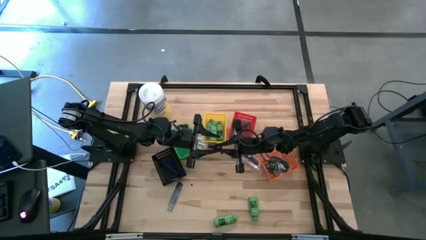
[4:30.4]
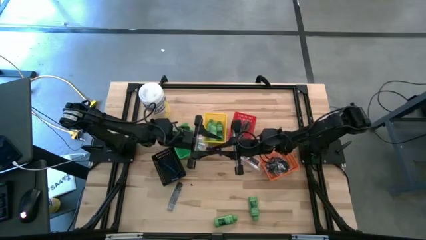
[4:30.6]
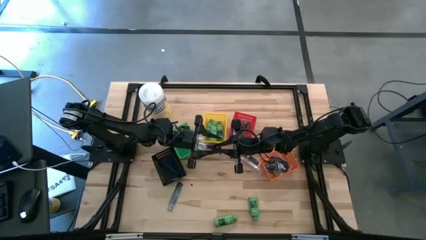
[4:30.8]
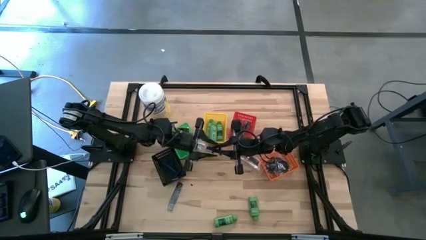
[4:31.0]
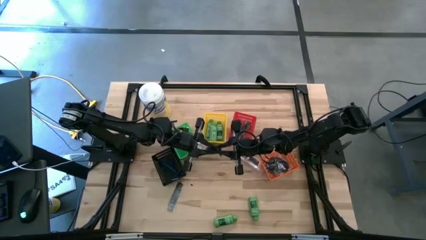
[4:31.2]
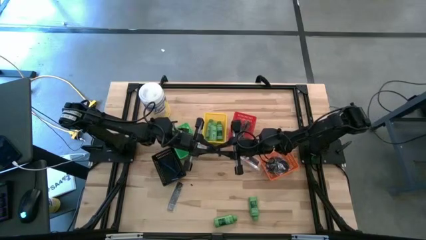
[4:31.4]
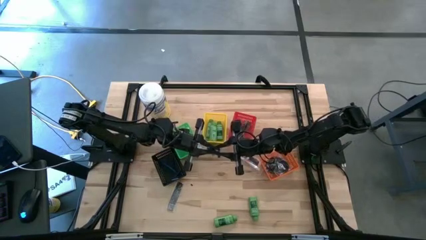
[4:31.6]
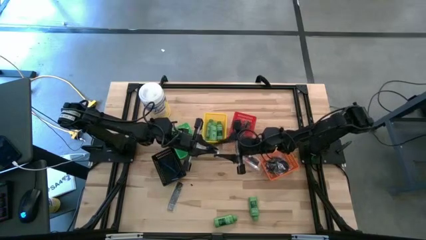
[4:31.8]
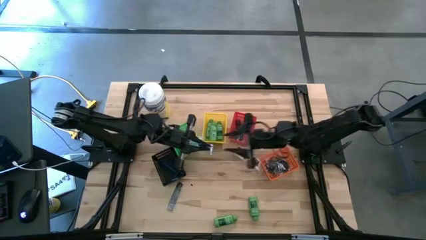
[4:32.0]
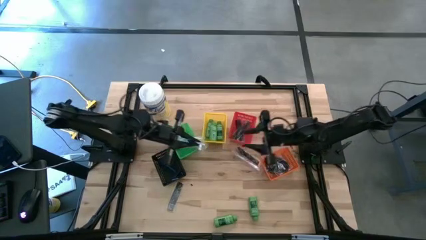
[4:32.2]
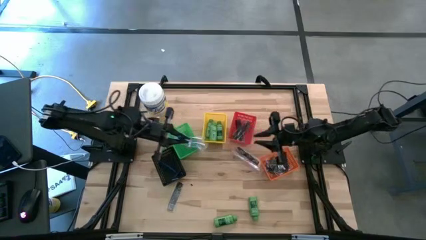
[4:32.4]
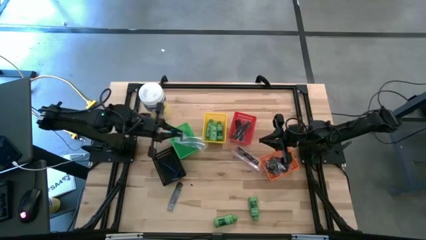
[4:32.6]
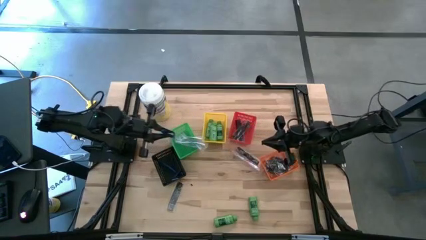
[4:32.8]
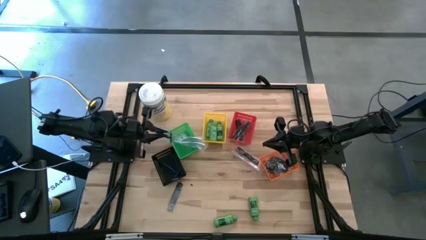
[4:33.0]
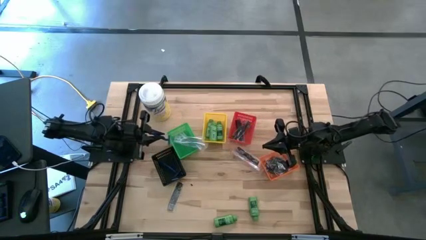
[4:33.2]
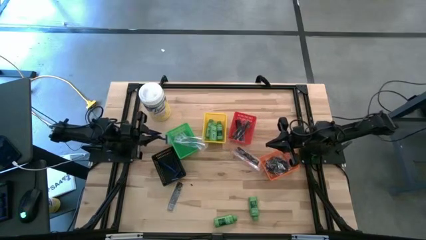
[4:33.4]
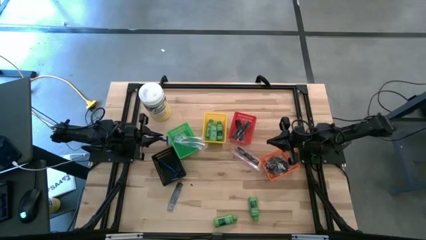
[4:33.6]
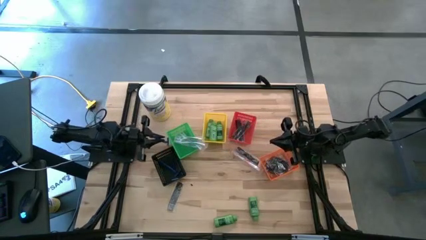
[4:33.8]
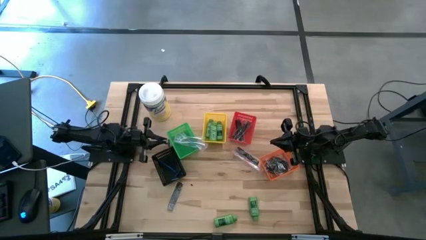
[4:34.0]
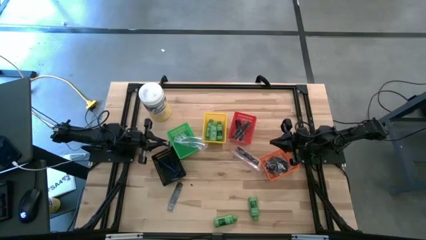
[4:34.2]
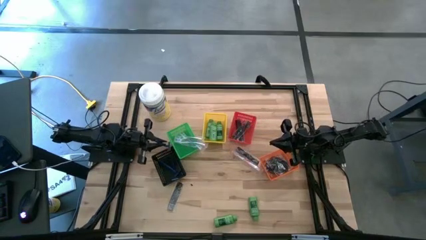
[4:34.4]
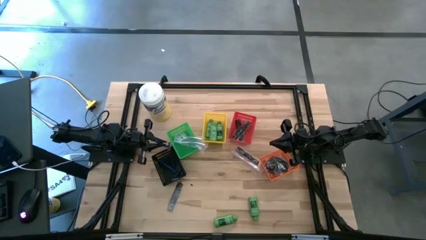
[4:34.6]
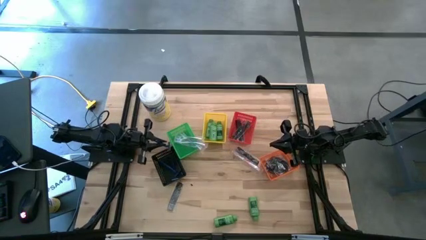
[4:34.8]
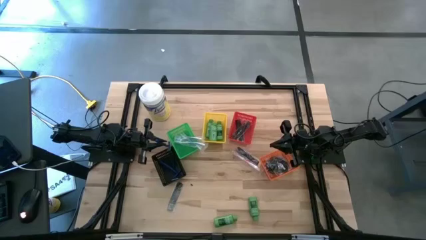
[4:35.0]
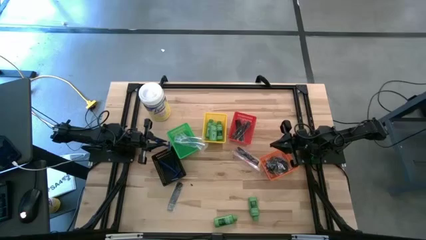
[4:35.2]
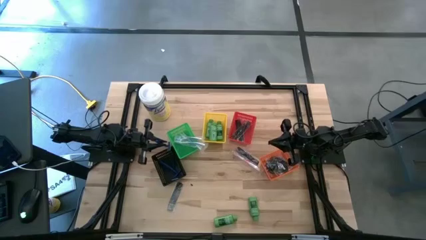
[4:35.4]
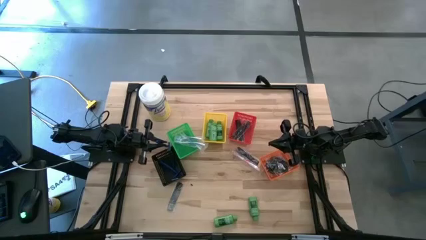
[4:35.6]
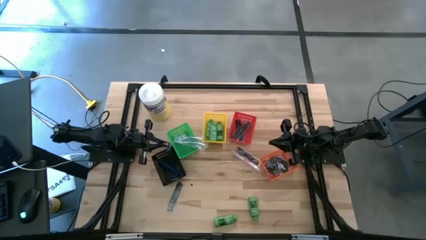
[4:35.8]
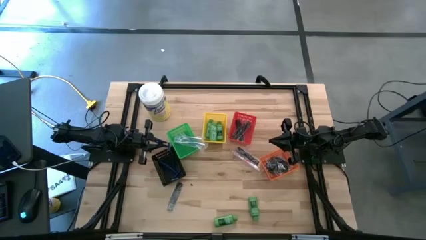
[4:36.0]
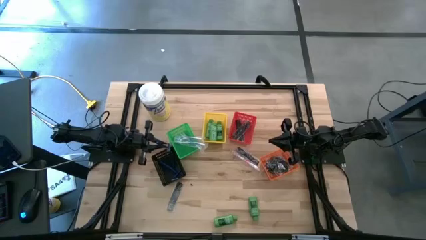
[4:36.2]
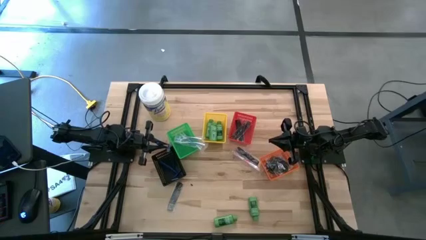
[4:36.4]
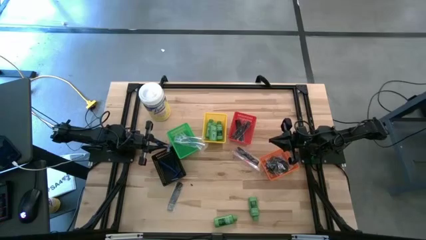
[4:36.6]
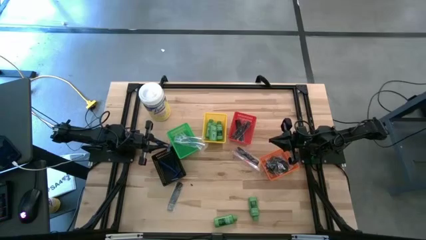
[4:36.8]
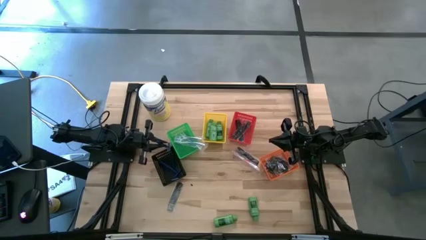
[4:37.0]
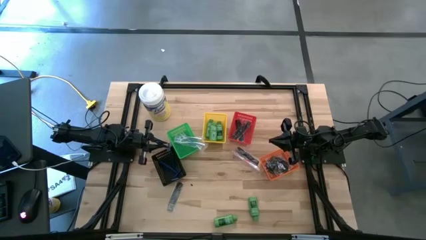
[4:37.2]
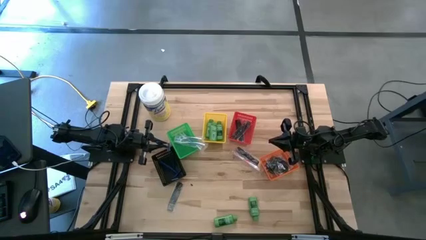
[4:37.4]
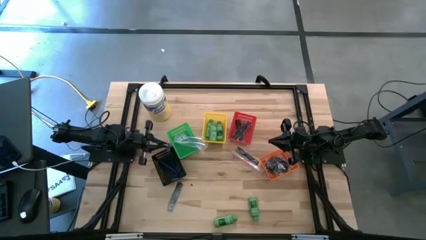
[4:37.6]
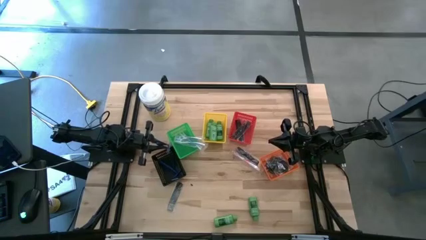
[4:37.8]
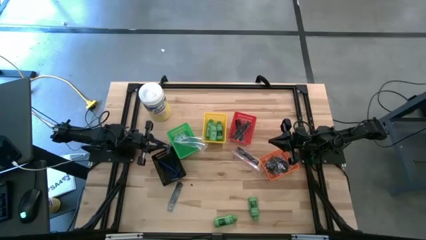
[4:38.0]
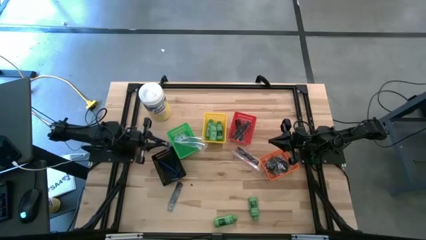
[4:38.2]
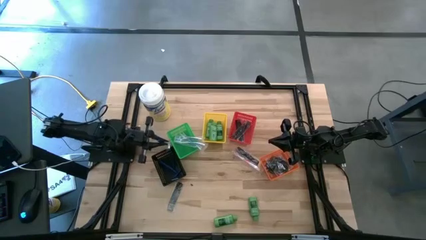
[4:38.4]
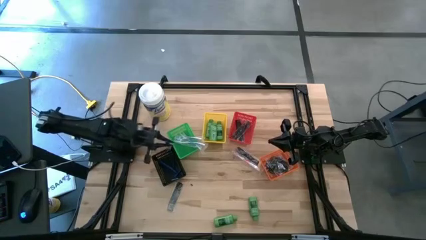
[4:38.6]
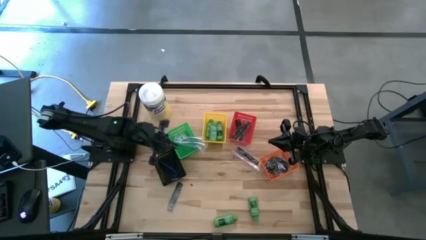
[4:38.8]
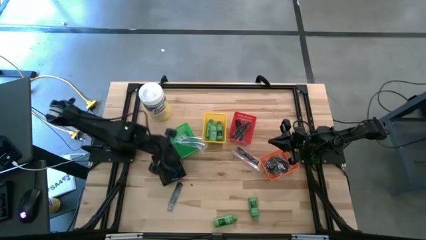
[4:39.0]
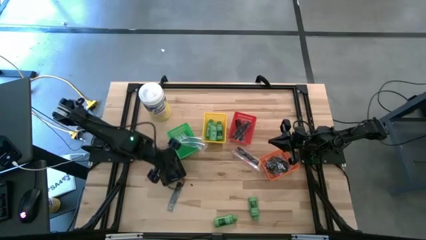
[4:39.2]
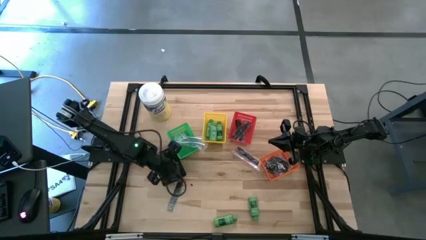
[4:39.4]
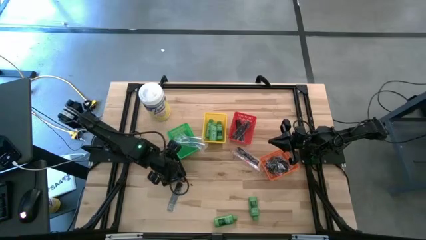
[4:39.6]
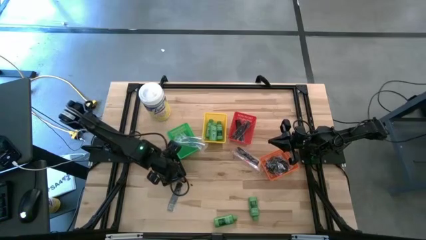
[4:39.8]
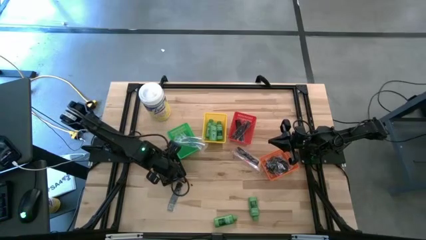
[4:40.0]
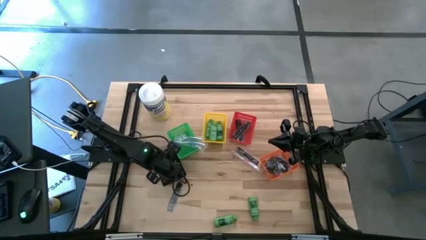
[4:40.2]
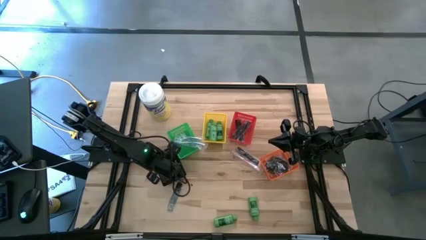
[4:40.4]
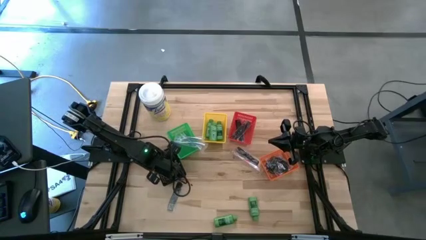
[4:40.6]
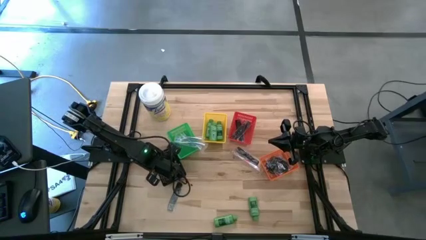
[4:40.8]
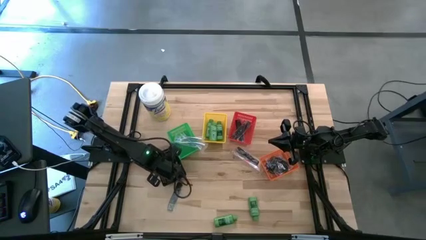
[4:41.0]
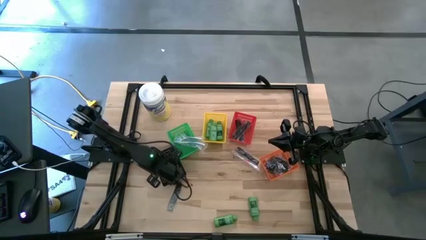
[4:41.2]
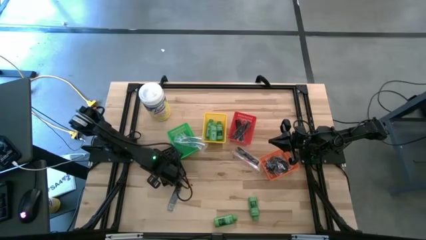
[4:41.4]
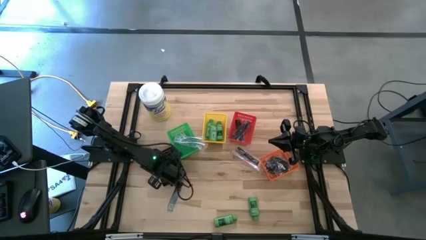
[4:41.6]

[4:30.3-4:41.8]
Task: Pick & Place Travel size toiletries
Put the blue razor into the black bin
